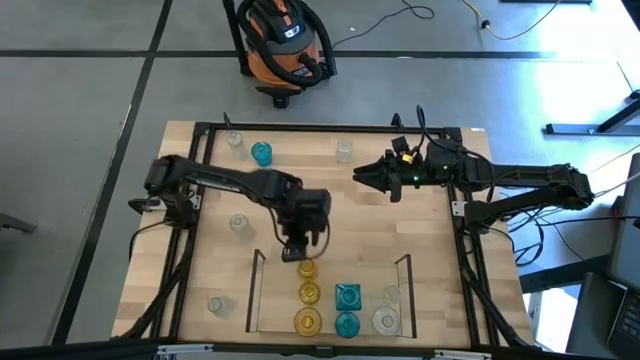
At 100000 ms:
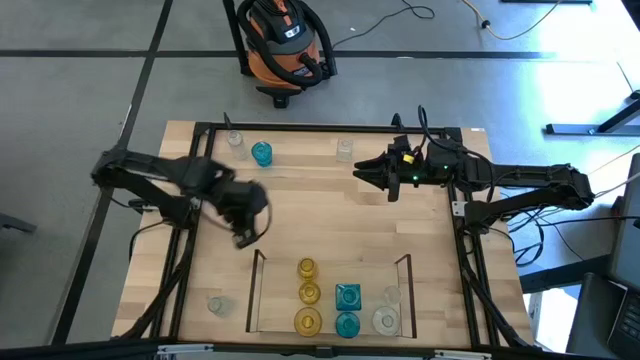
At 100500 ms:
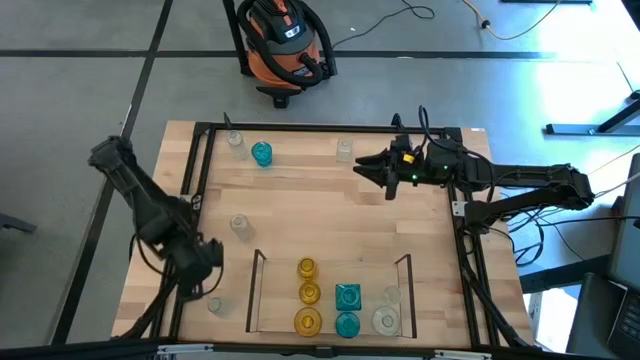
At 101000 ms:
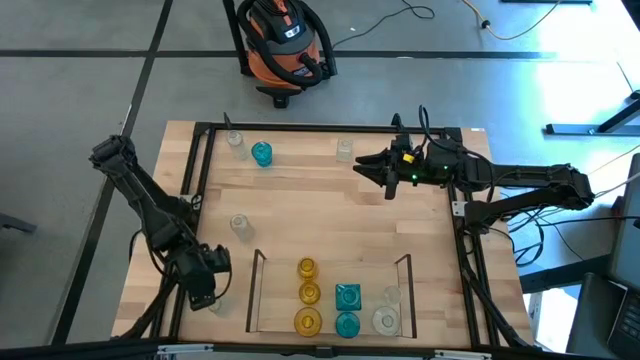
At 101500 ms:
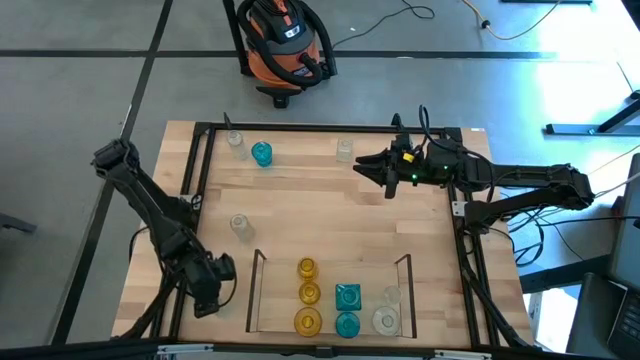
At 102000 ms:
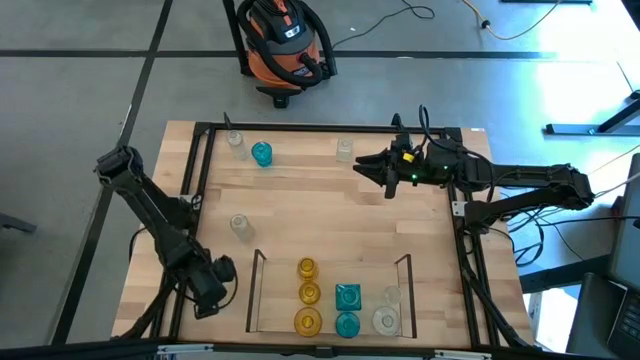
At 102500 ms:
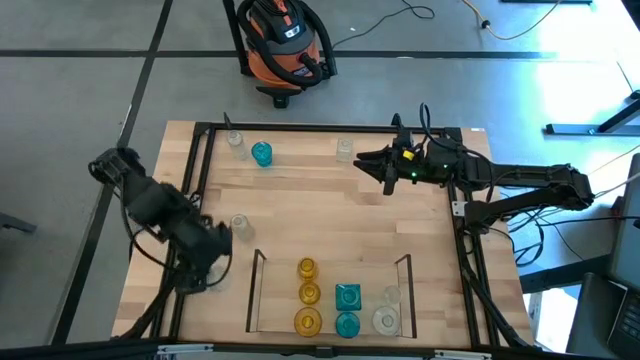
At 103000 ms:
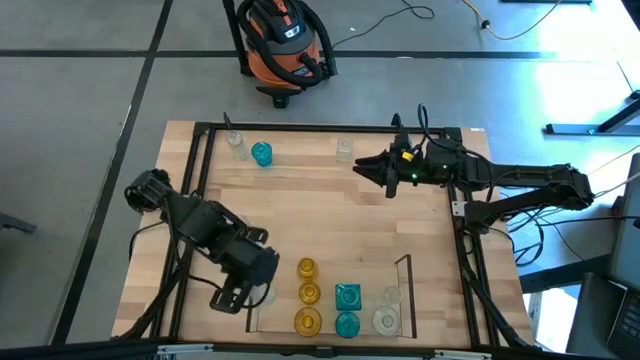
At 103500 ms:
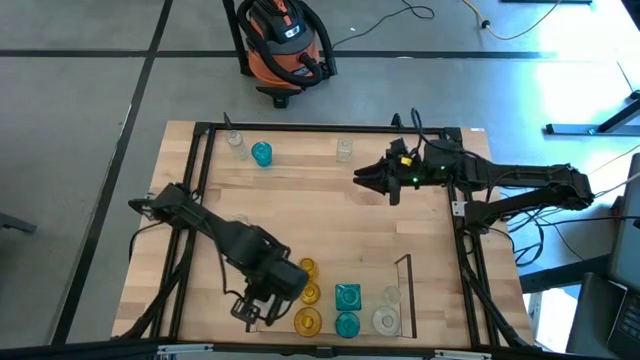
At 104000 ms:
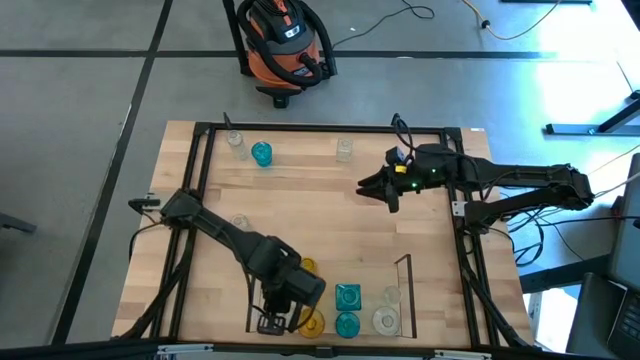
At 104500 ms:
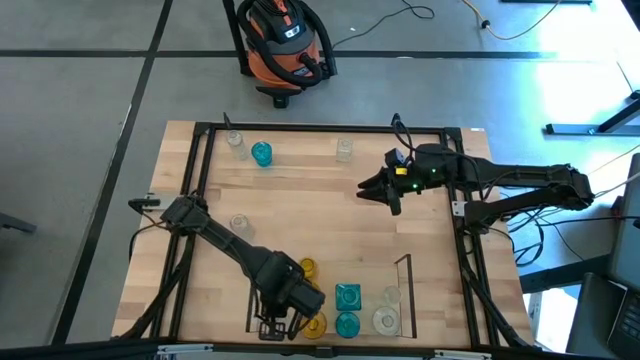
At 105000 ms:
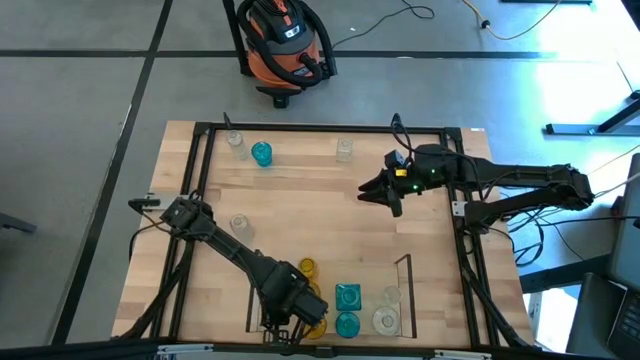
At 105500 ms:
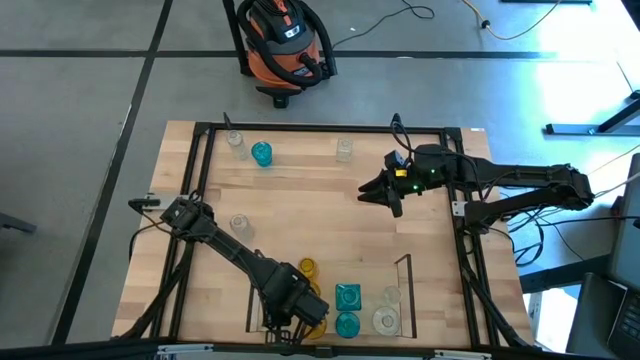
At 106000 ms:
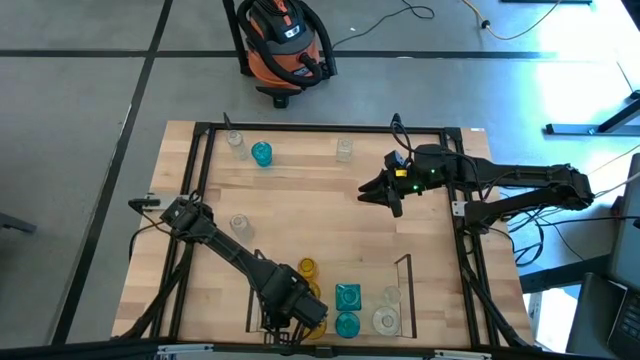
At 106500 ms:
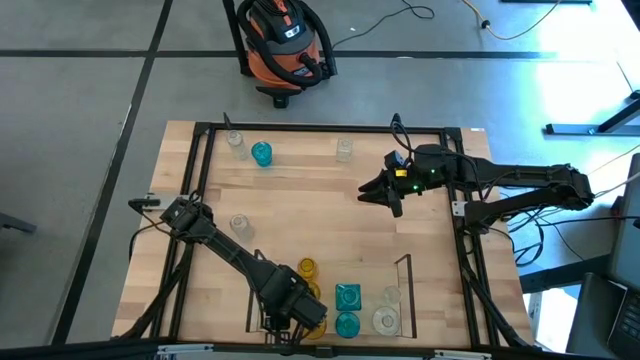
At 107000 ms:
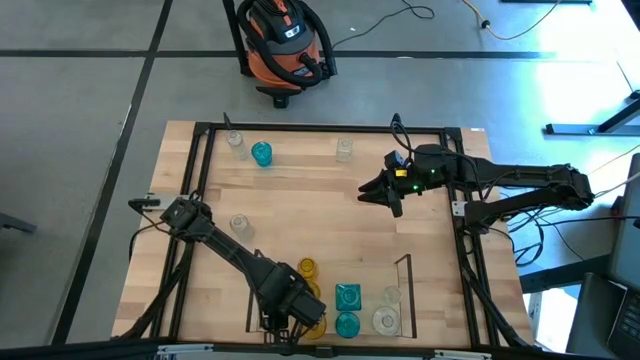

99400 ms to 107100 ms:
Task: sort vases onto shelf
Put the transparent vase on the shelf

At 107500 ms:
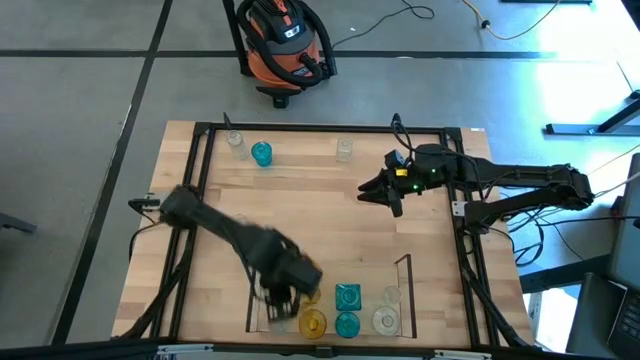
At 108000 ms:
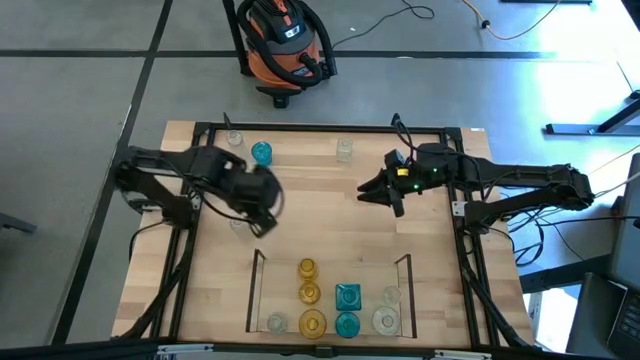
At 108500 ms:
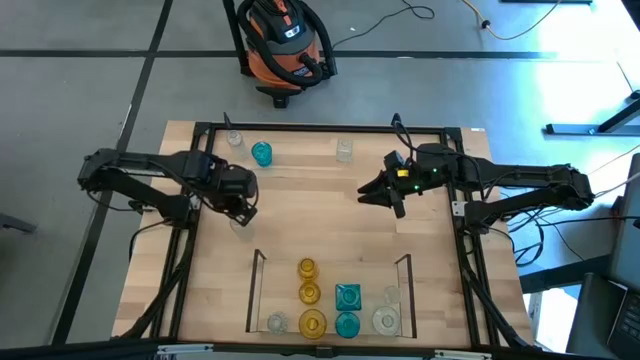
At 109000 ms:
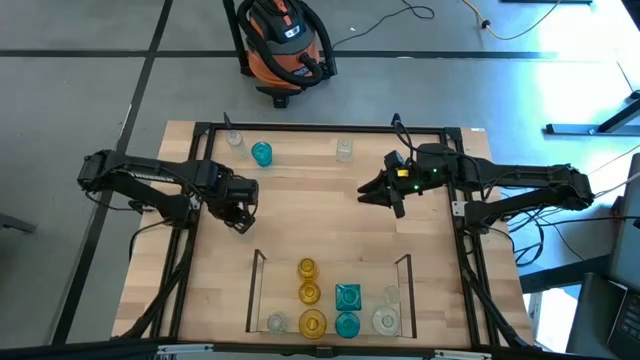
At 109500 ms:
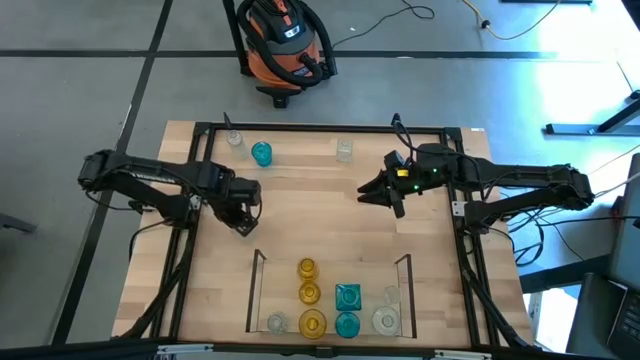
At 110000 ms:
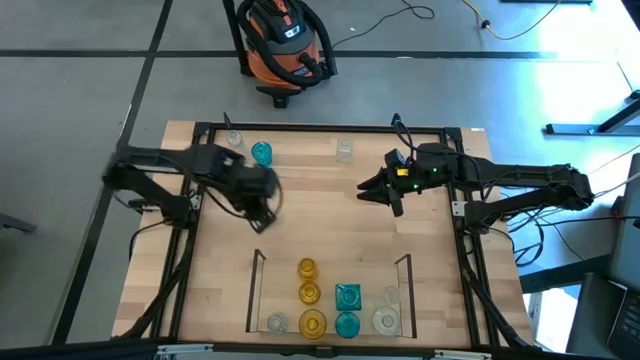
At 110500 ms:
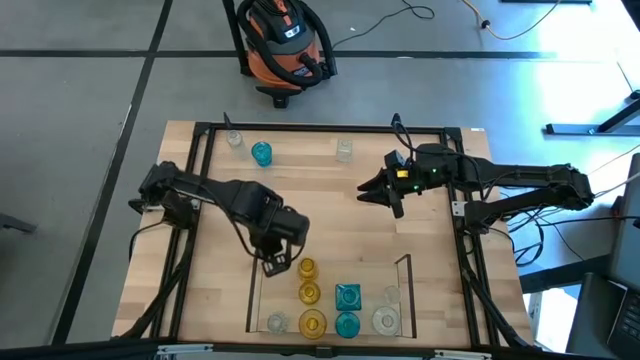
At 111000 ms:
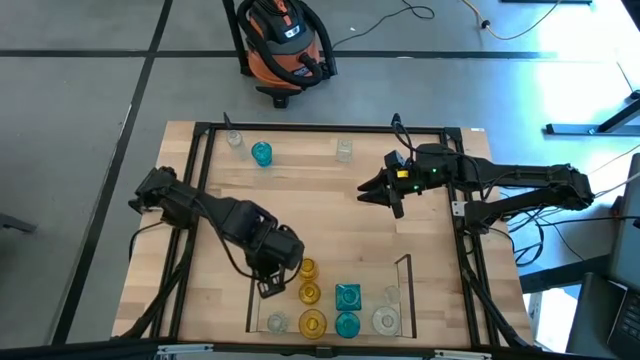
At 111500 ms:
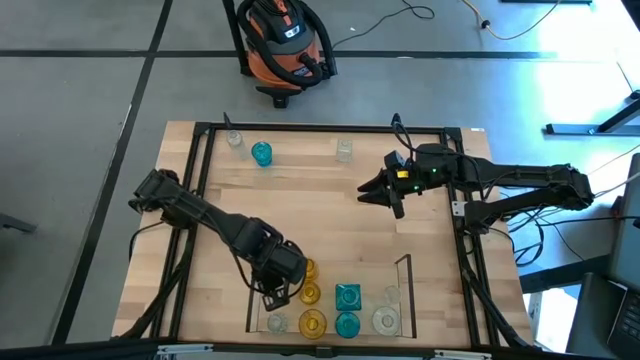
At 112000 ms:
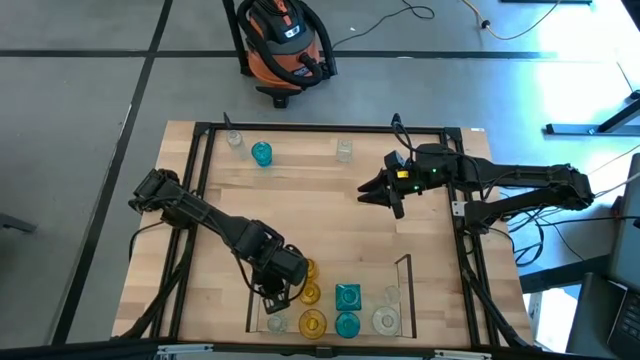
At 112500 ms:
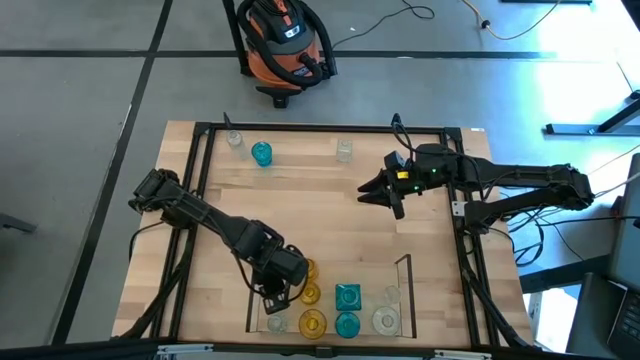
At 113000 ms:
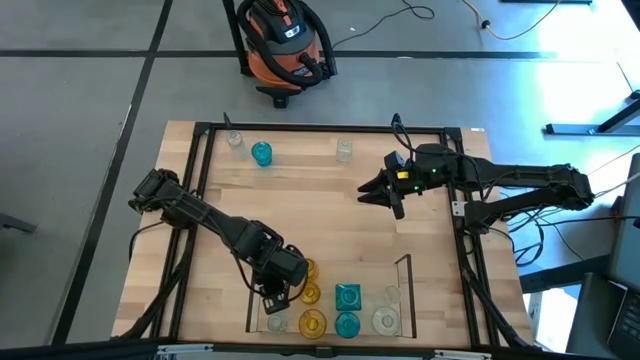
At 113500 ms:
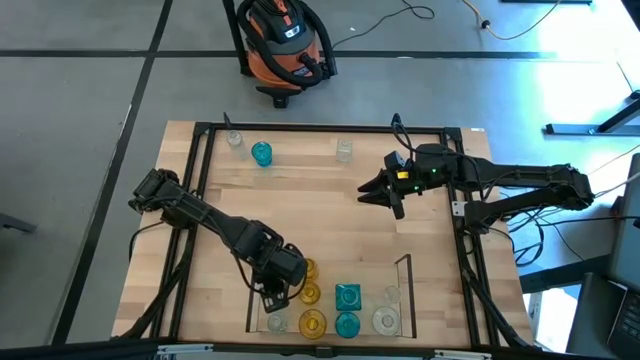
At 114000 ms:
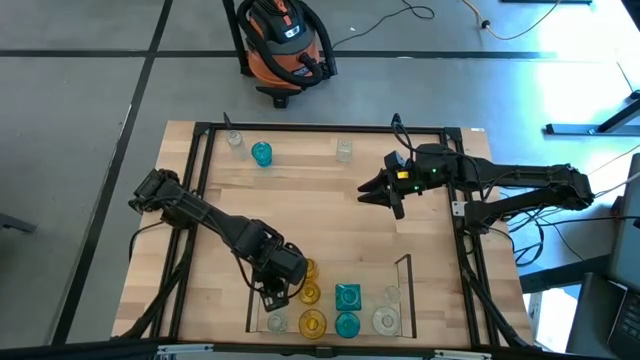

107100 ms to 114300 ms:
Put the transparent vase on the shelf aligned with the other transparent vase

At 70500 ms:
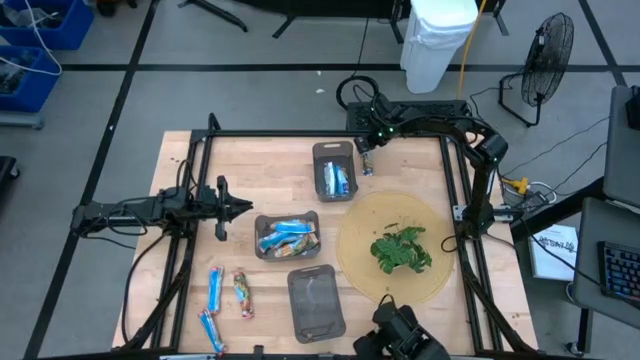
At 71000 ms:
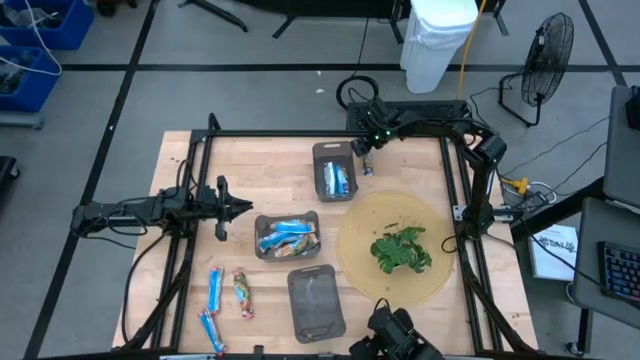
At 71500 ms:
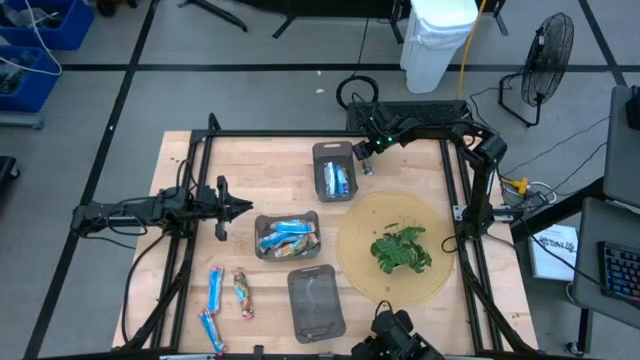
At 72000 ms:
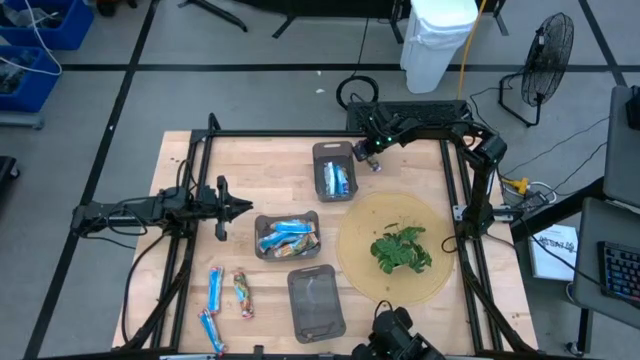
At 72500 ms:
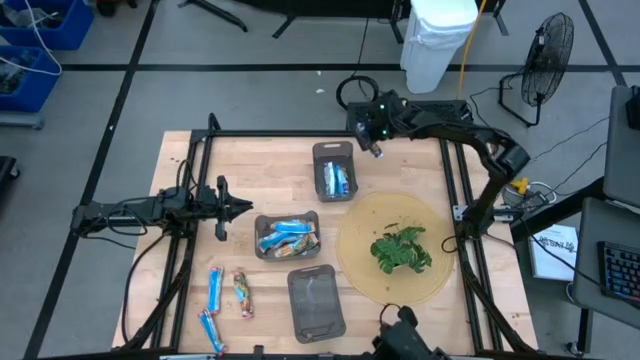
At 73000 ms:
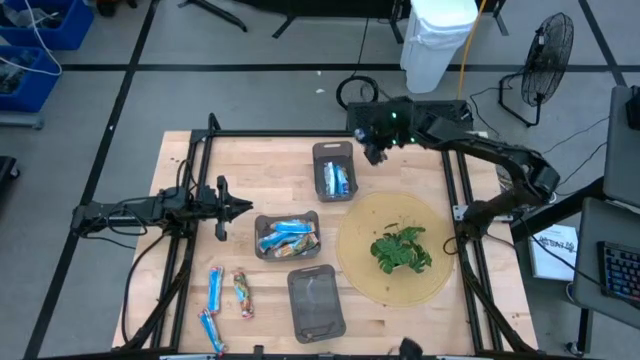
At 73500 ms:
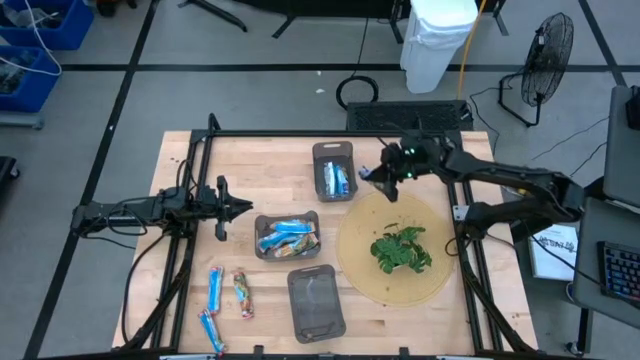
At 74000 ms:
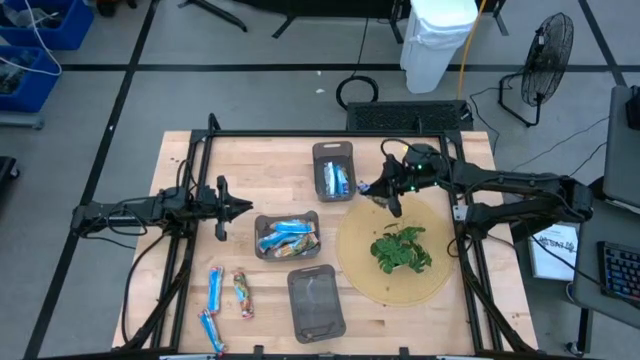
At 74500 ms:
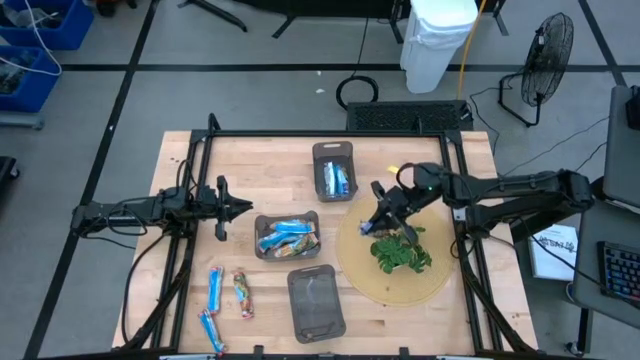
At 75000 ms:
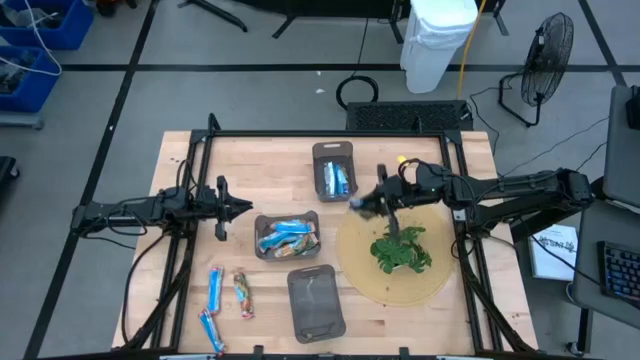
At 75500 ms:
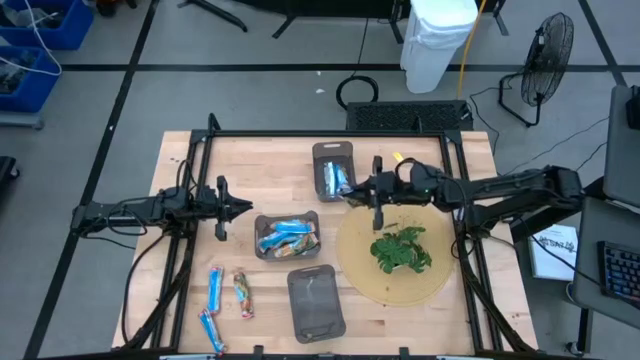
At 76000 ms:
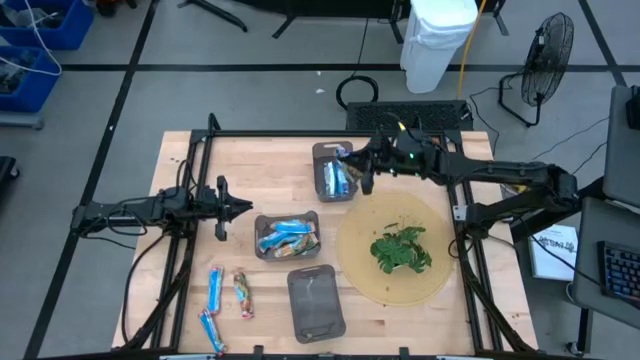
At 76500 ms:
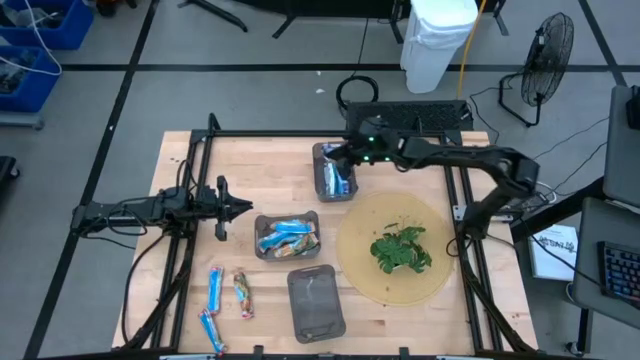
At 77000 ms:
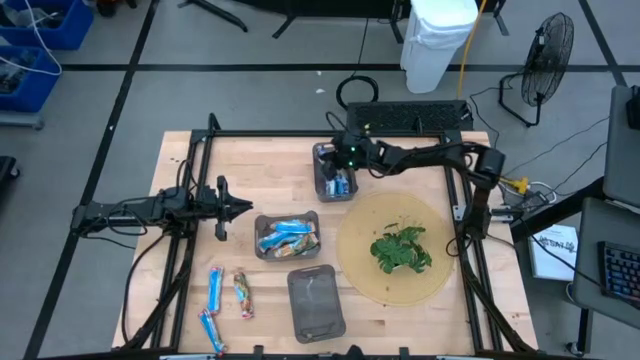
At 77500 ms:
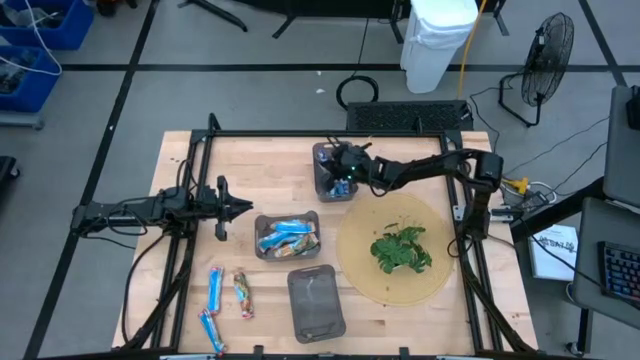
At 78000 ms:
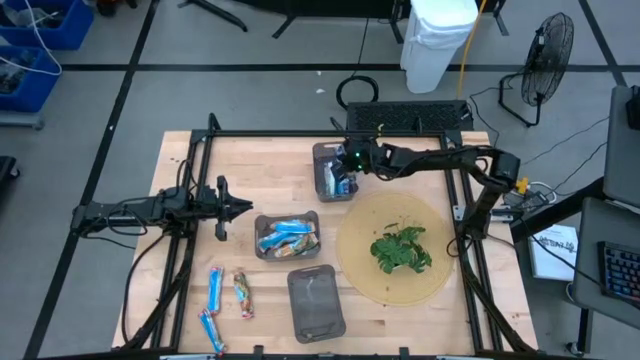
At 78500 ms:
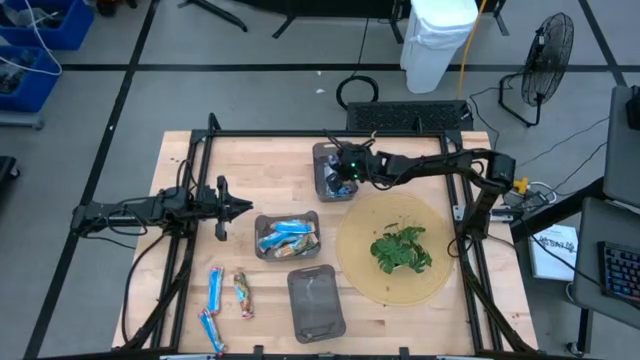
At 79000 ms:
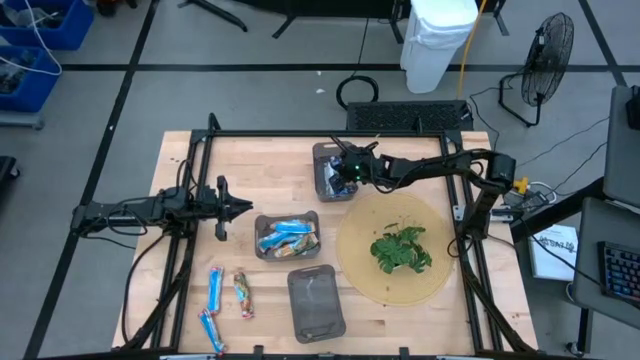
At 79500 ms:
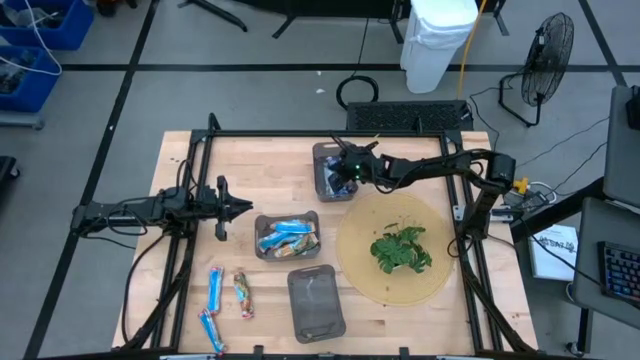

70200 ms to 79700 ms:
Task: Pick and place Granola Bars by type
Put the blue granola bar into the top black bin
